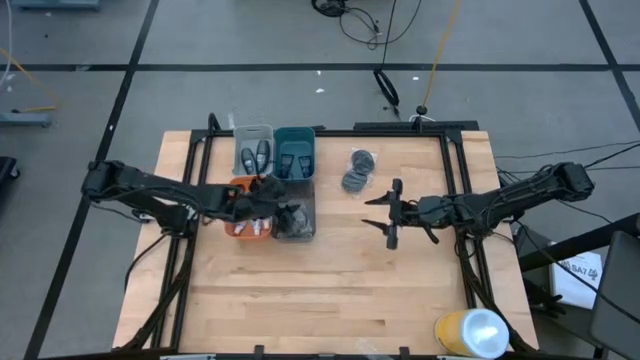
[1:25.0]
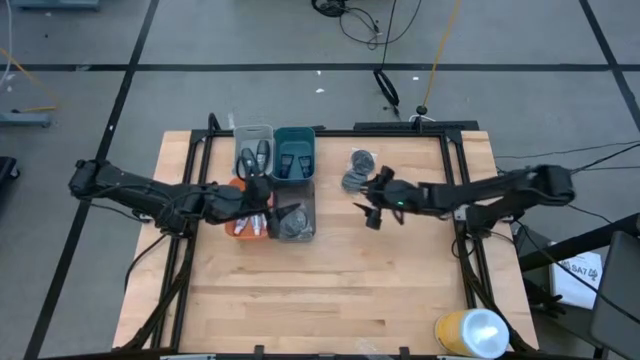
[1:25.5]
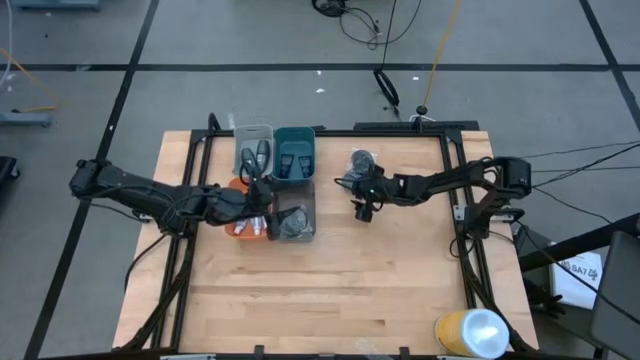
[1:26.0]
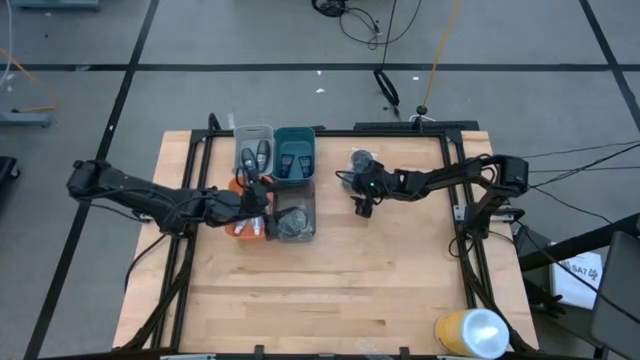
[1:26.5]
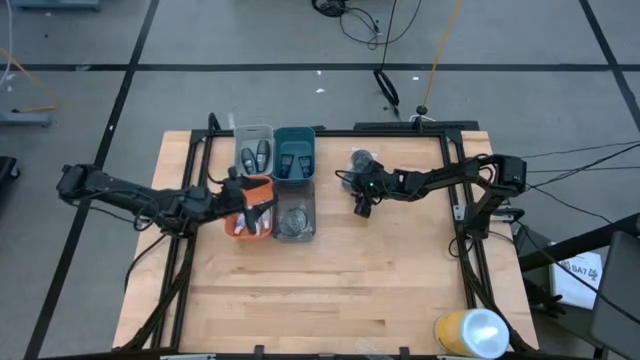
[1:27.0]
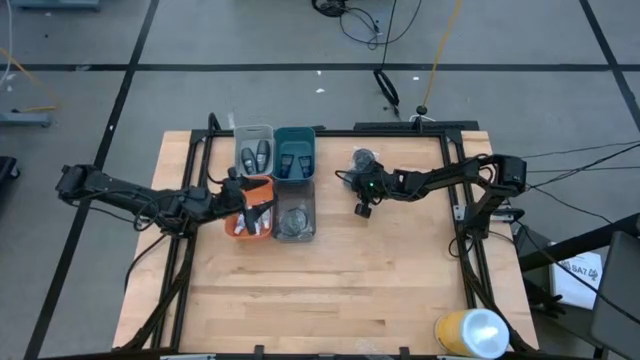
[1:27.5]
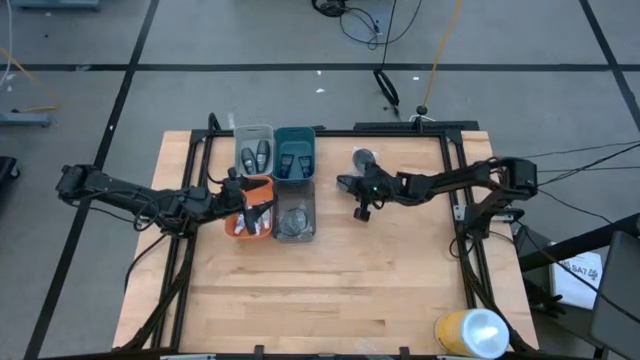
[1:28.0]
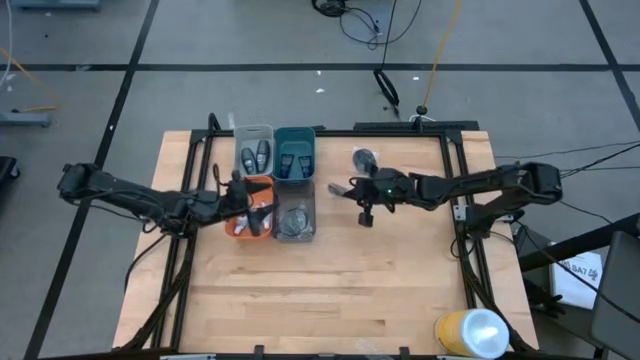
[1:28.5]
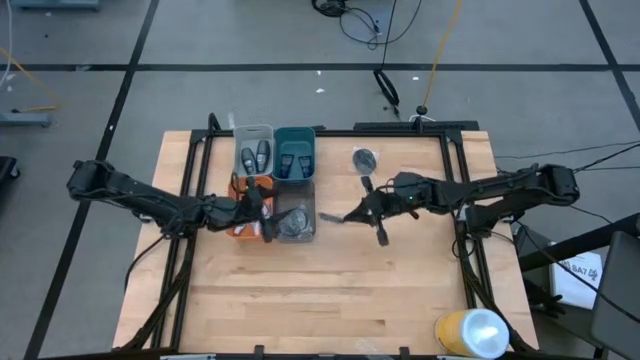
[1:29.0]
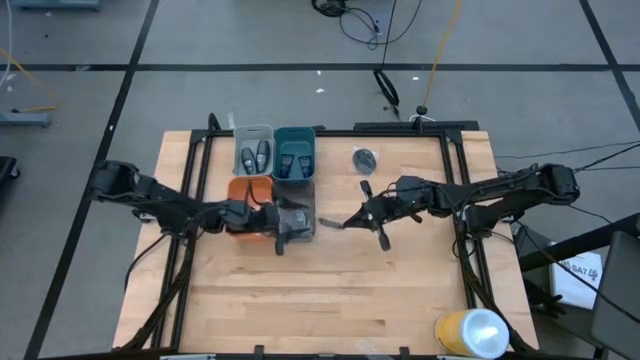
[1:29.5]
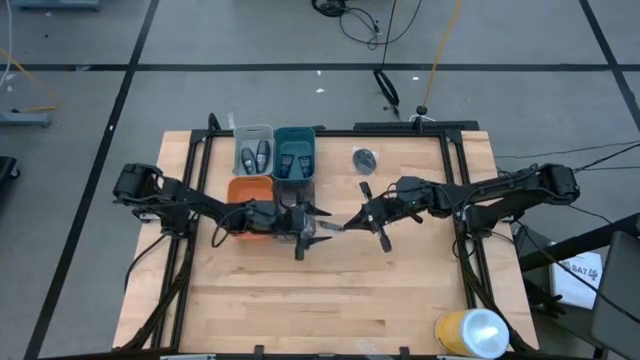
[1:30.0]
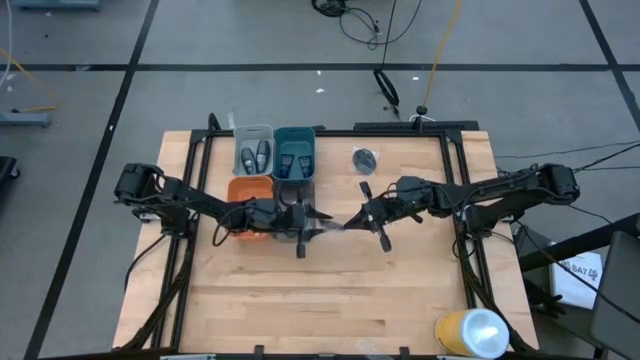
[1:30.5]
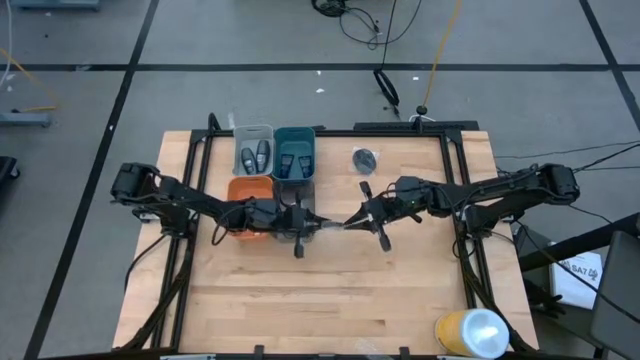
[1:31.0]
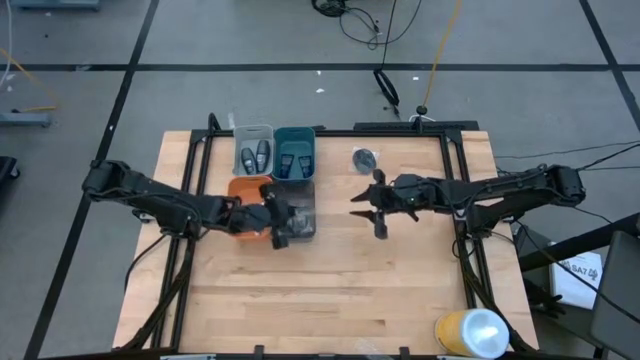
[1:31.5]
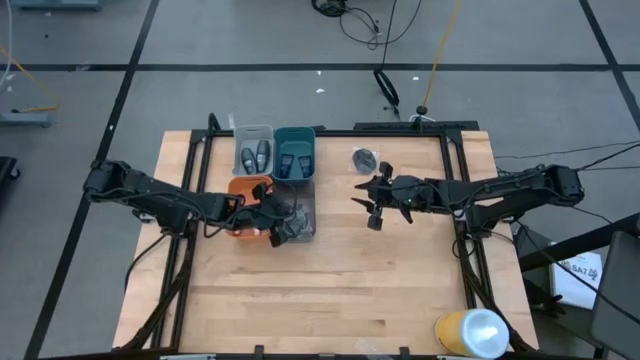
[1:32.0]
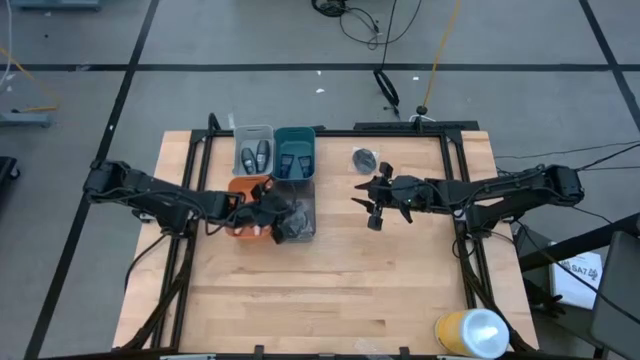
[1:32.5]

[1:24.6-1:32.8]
Task: Pick & Place Travel size toiletries
Put the bottom black hairbrush into the black bin

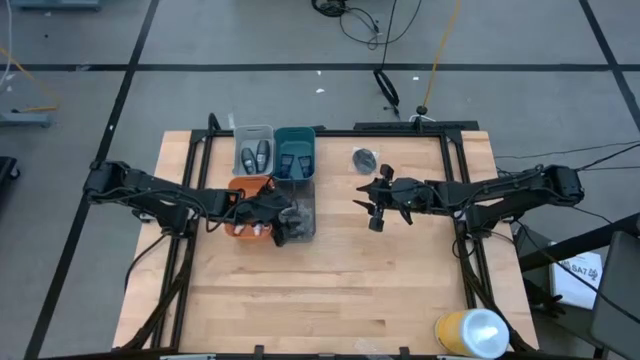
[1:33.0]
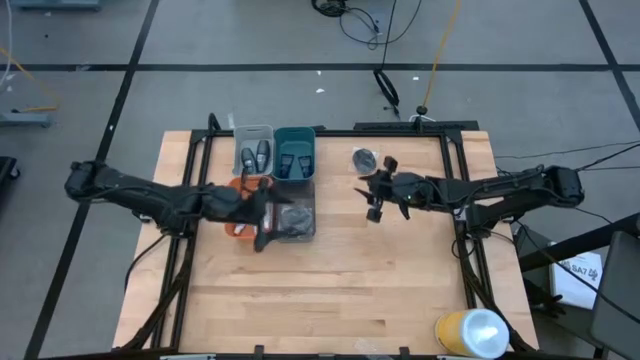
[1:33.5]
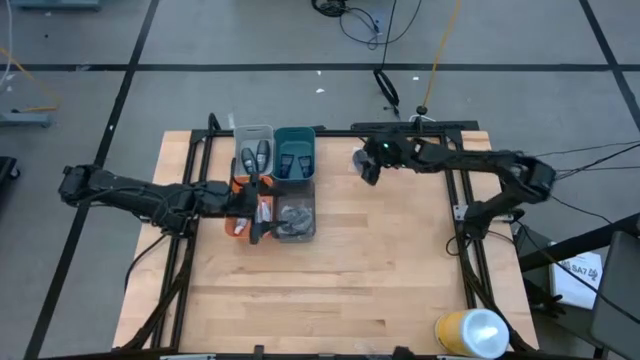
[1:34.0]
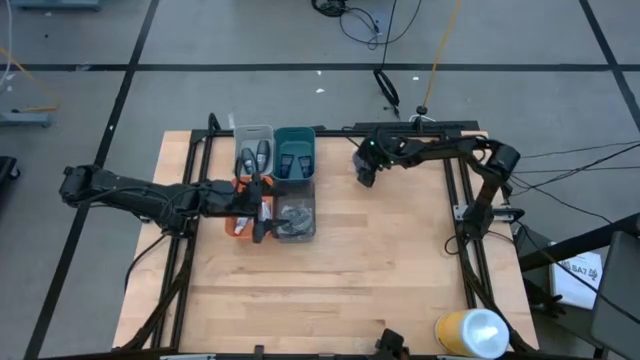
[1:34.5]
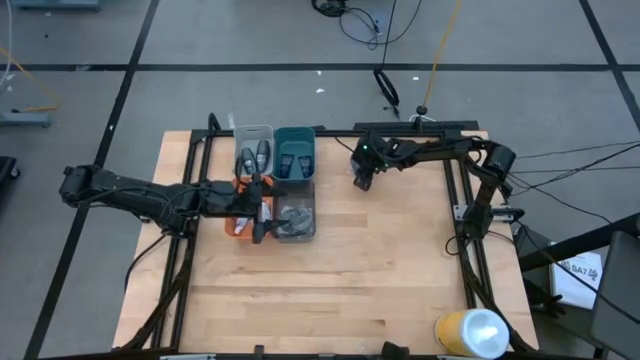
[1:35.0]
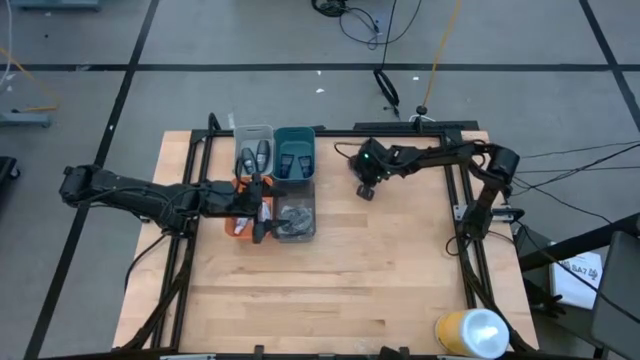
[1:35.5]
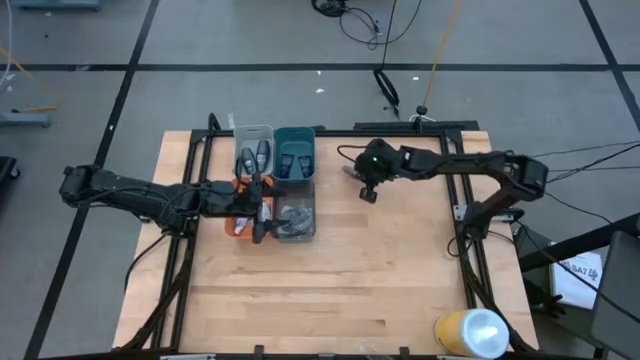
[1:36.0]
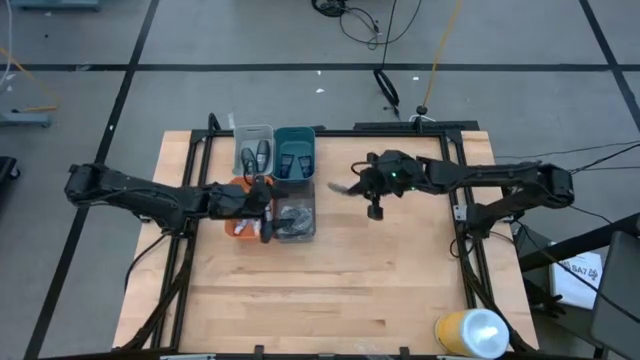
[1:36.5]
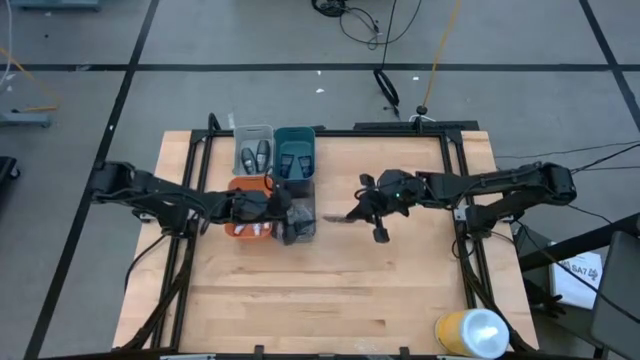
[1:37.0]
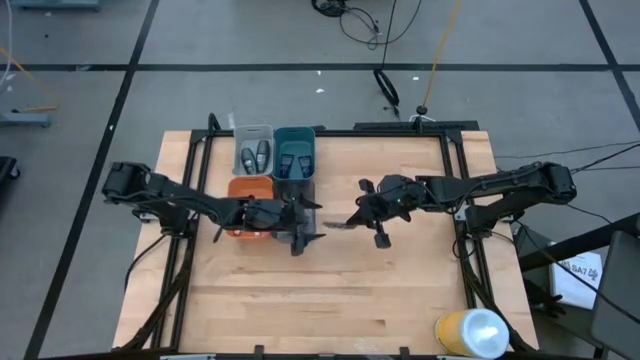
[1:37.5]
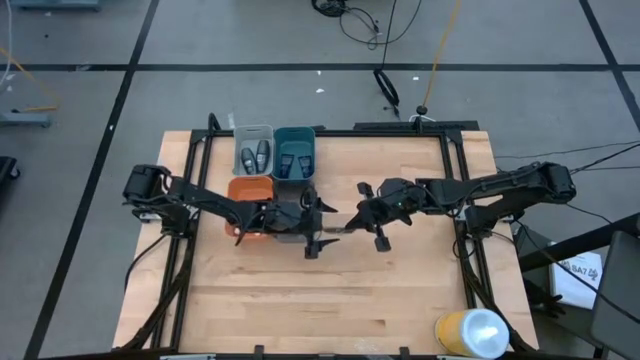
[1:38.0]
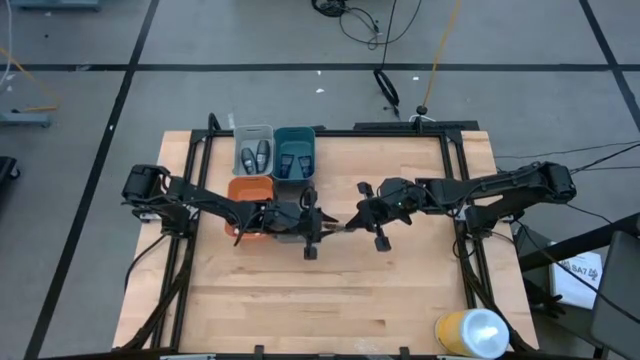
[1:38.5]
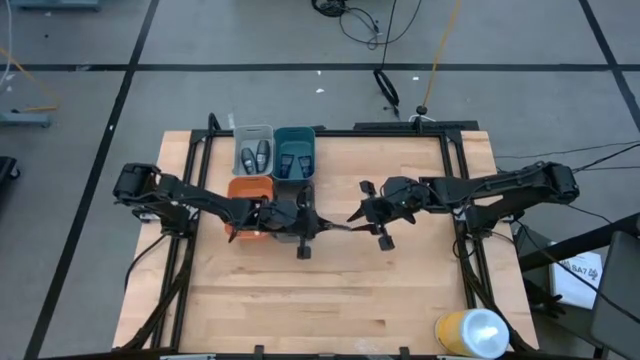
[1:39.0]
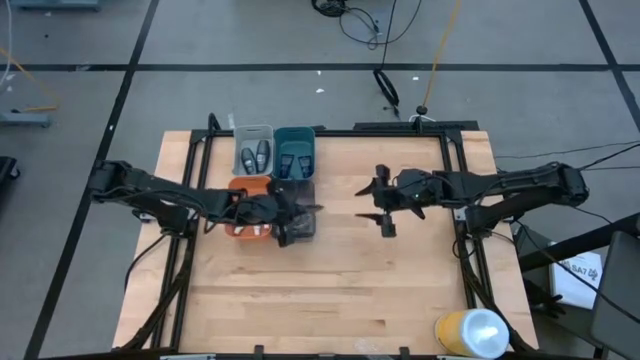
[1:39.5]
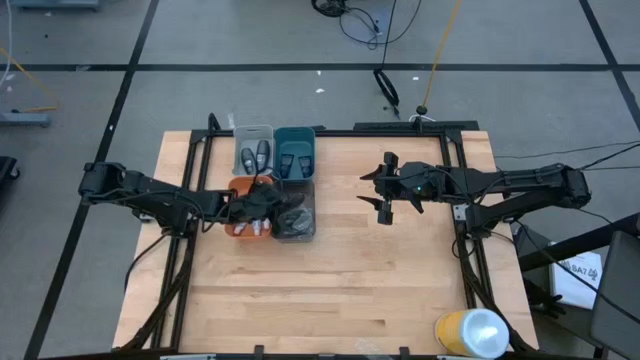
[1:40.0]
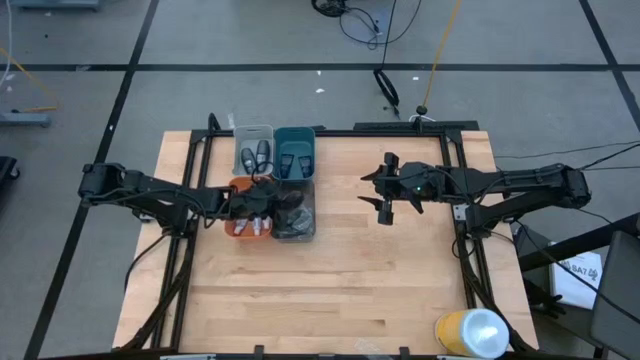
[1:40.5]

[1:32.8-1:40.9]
Put the black hairbrush into the black bin

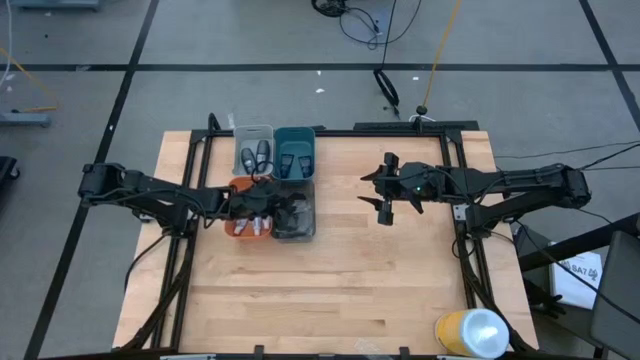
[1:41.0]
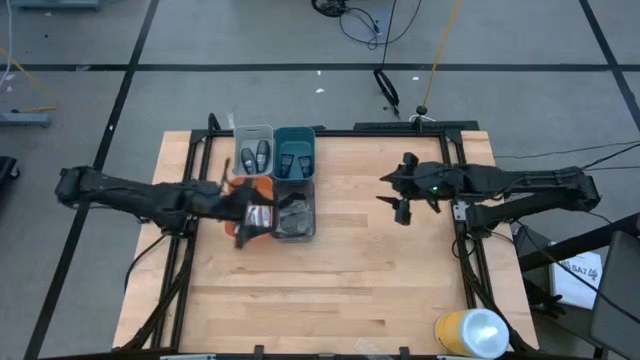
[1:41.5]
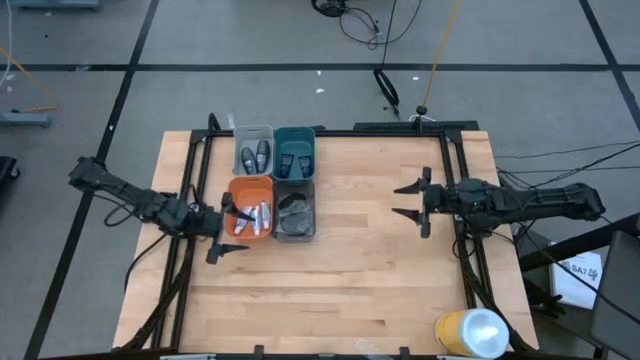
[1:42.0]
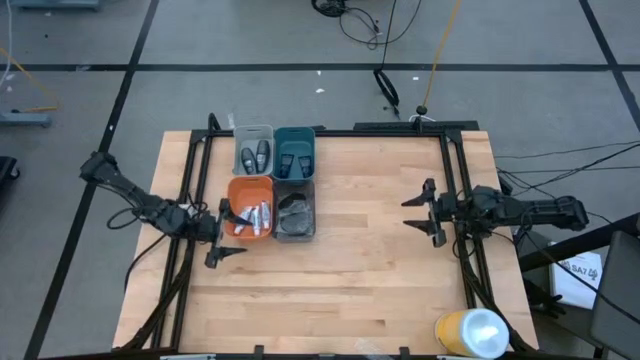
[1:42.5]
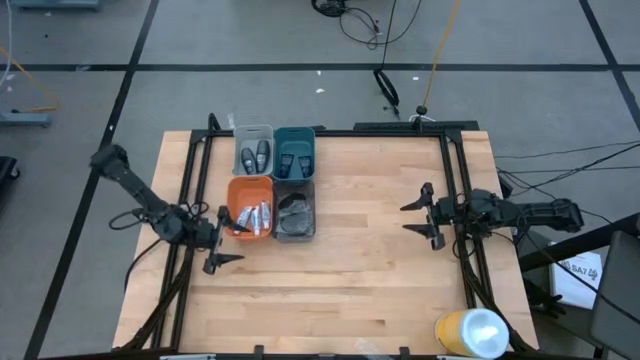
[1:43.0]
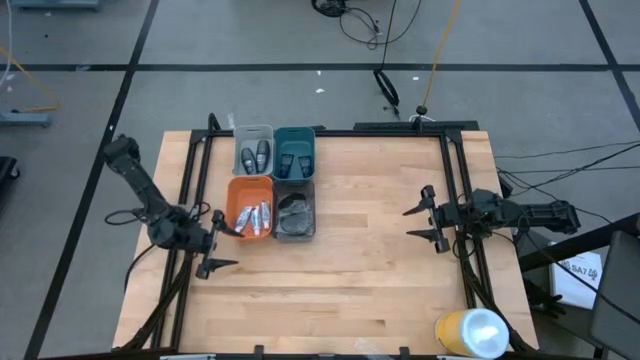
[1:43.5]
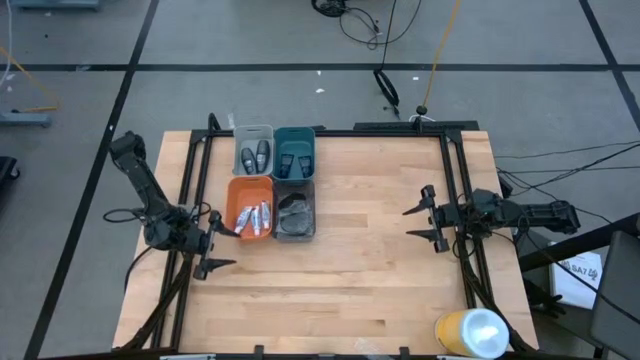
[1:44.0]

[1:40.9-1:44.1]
Return to Home Position

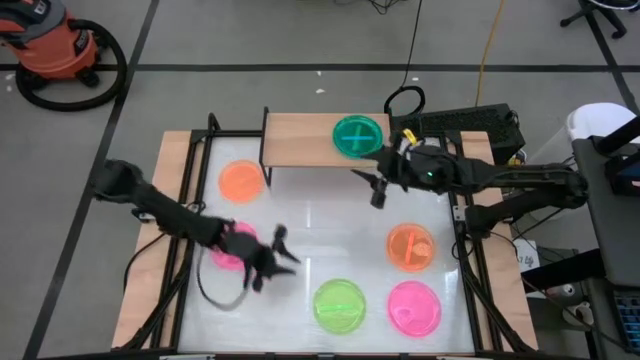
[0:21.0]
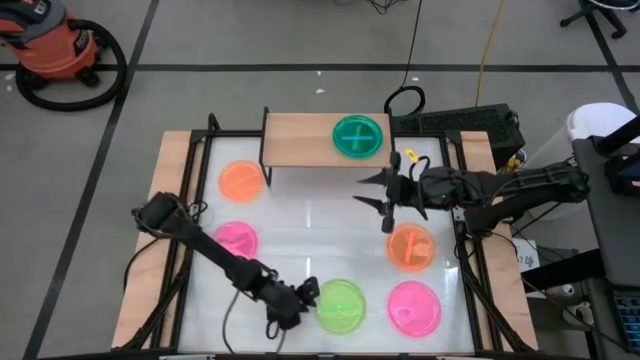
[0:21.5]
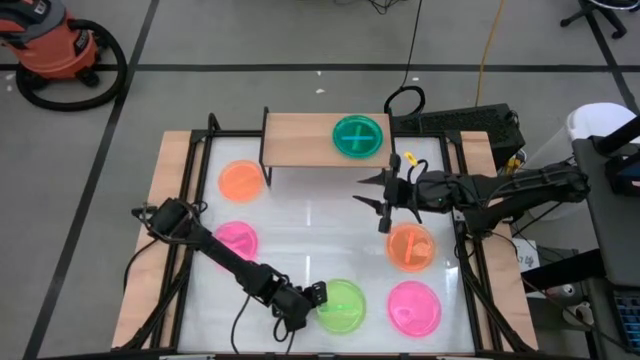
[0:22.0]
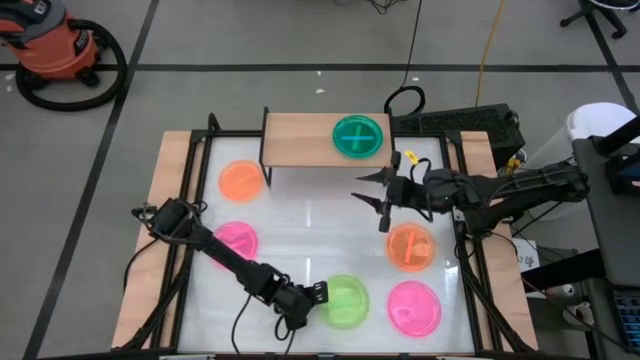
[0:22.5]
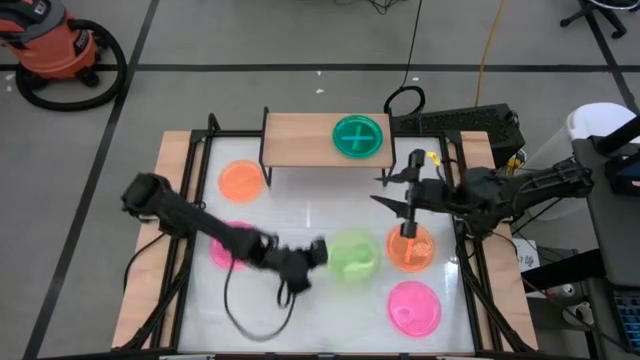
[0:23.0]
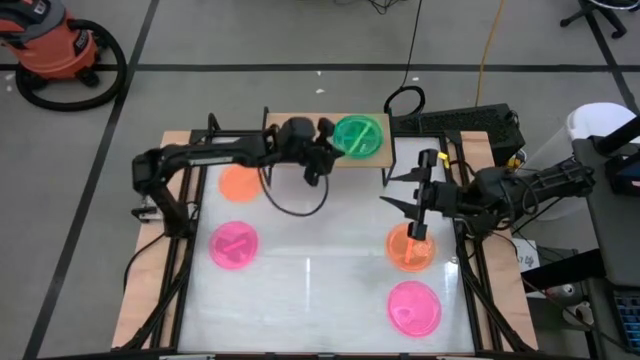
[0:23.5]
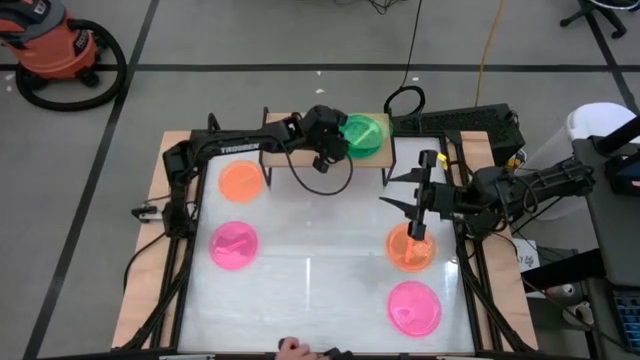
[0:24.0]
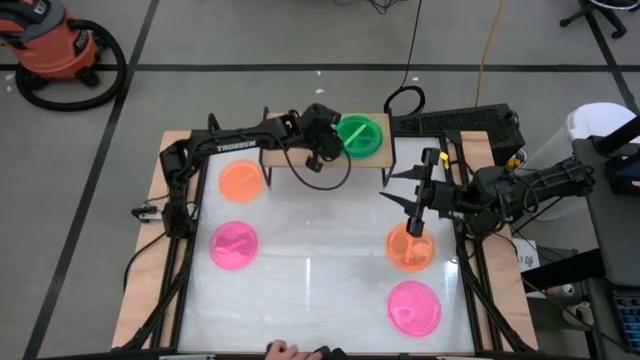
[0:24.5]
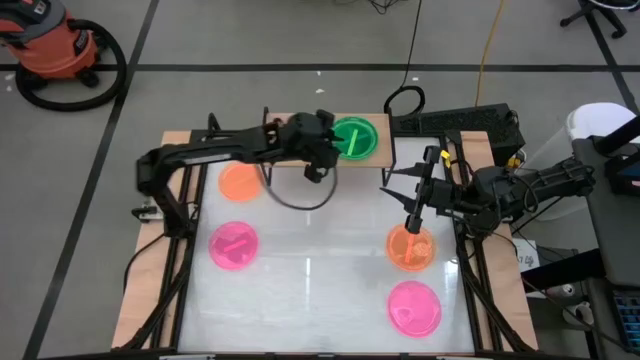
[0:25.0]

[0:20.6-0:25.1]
Task: Place and stack plates onto a shelf
Stack the green transparent plate on the blue transparent plate on the shelf
